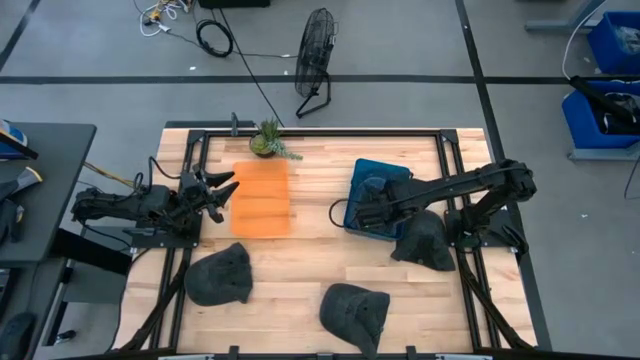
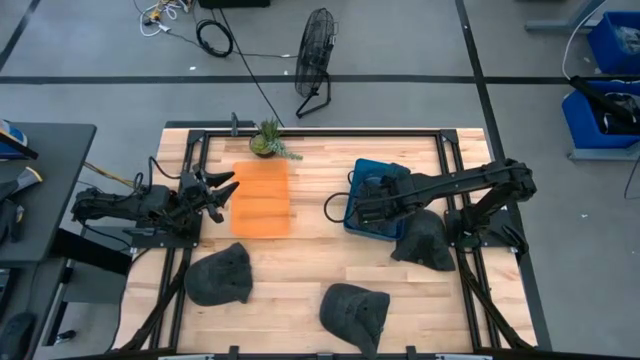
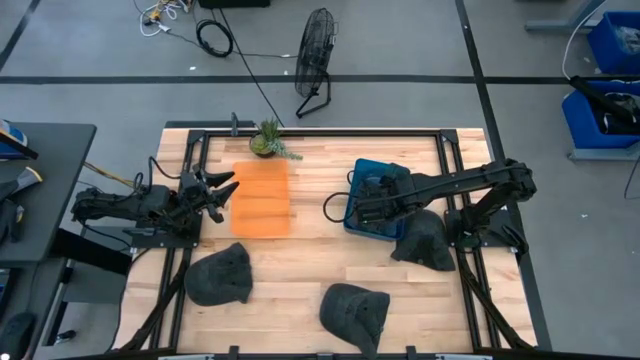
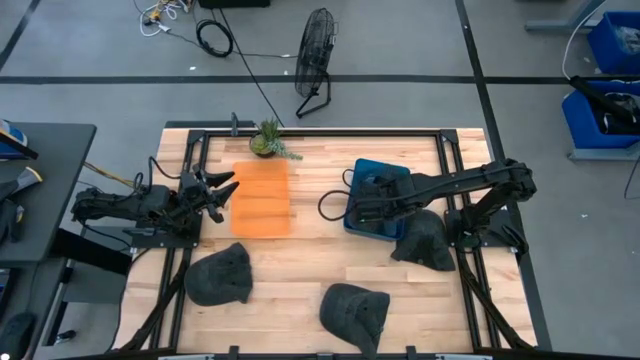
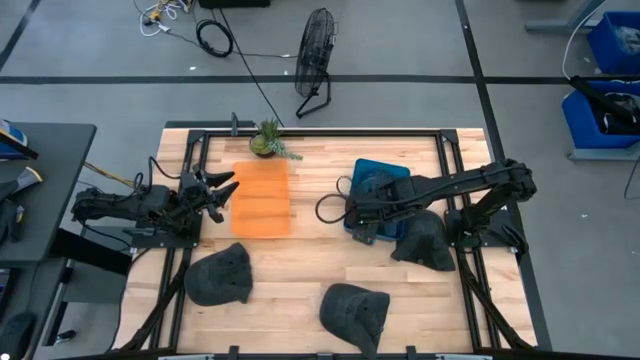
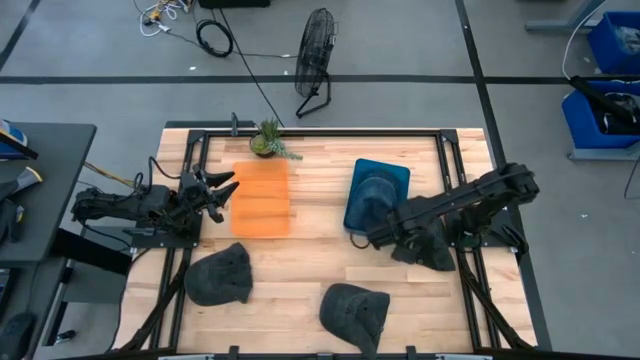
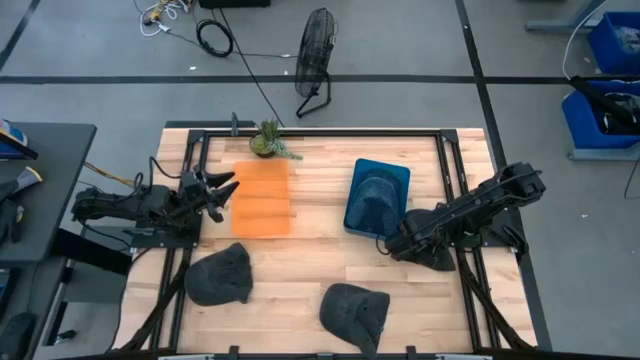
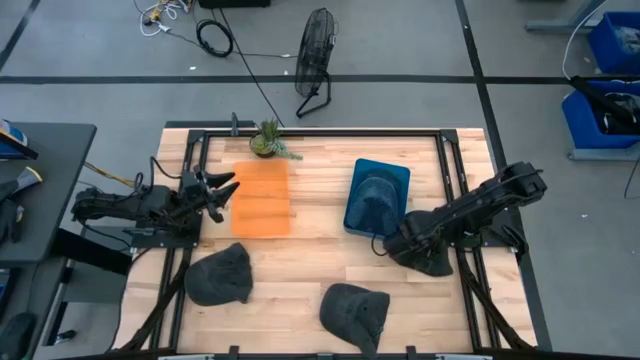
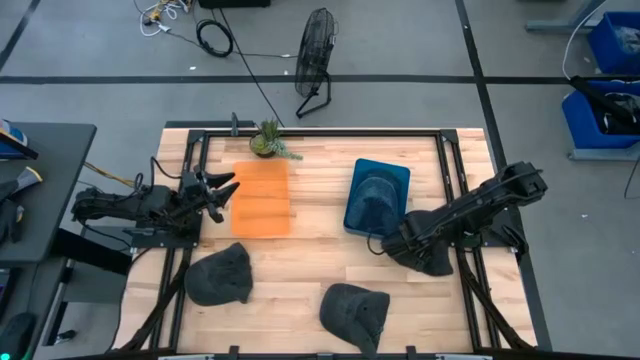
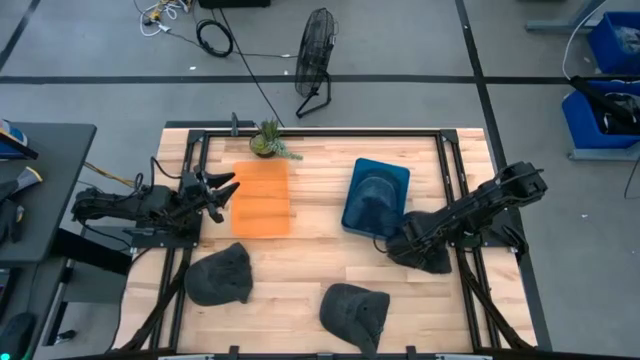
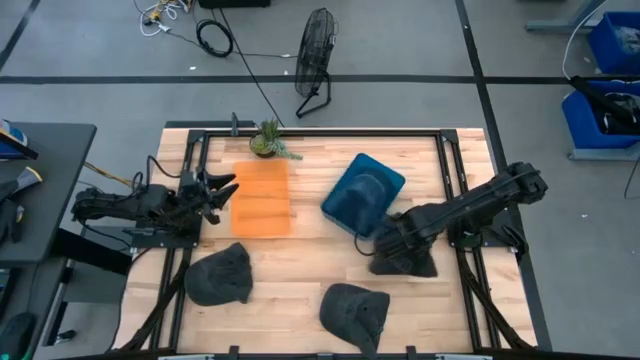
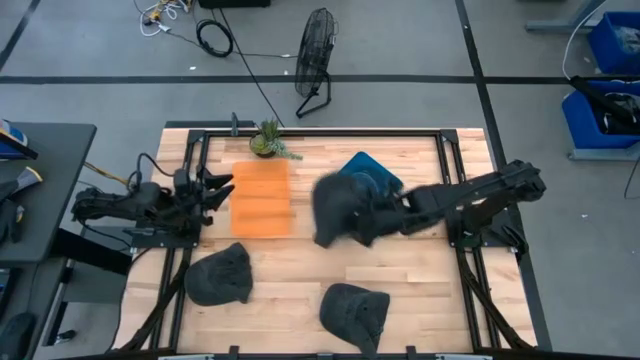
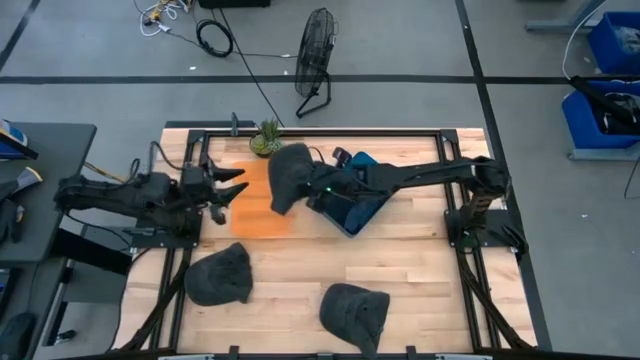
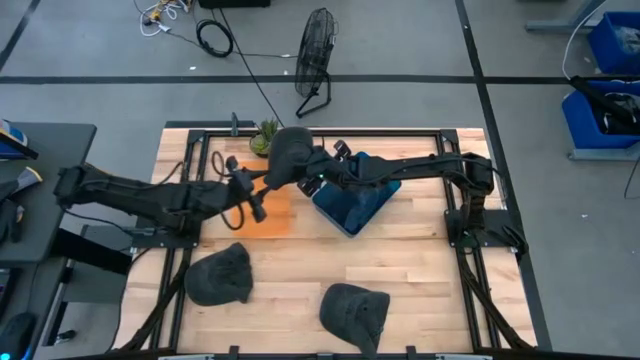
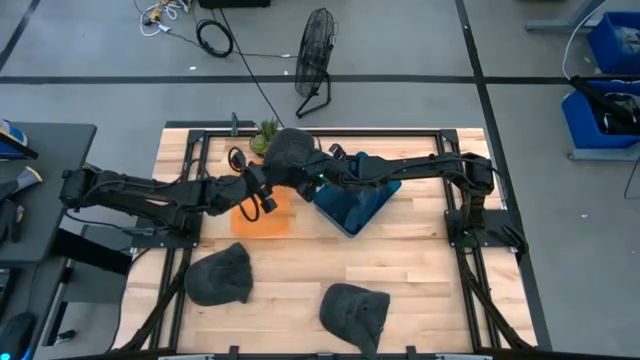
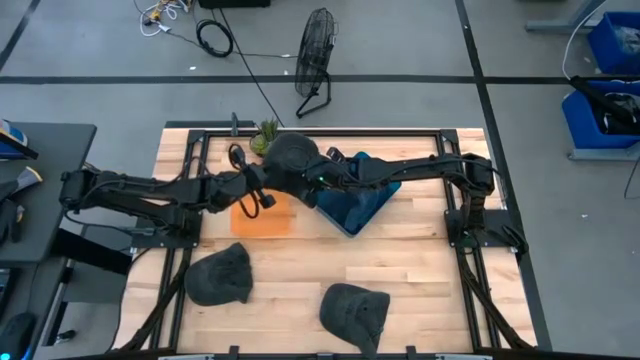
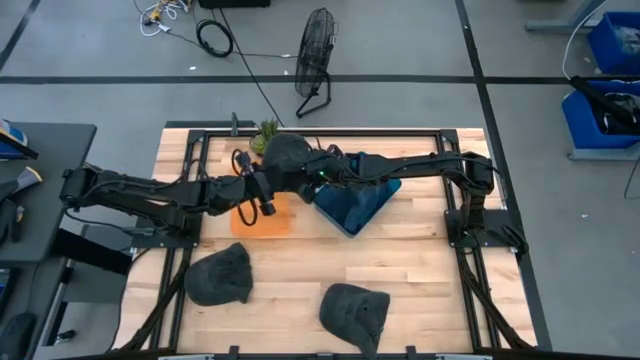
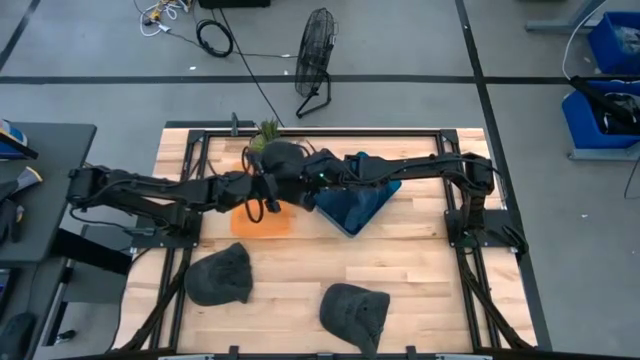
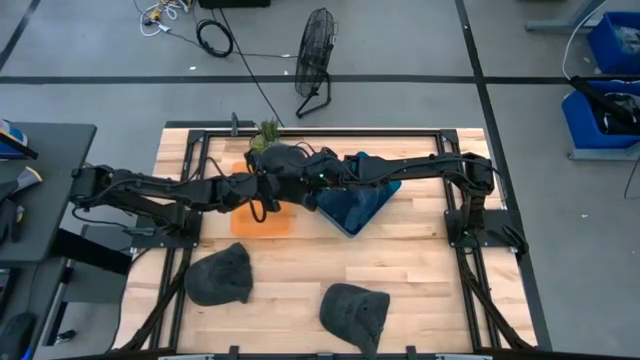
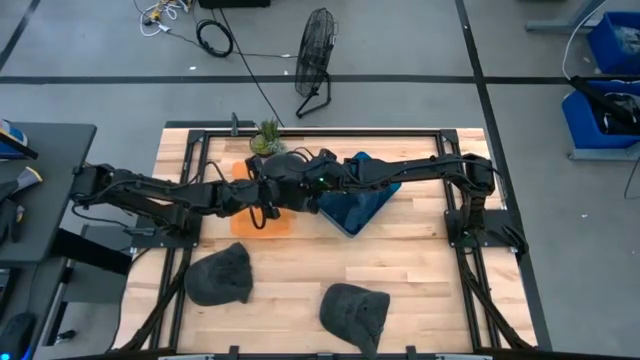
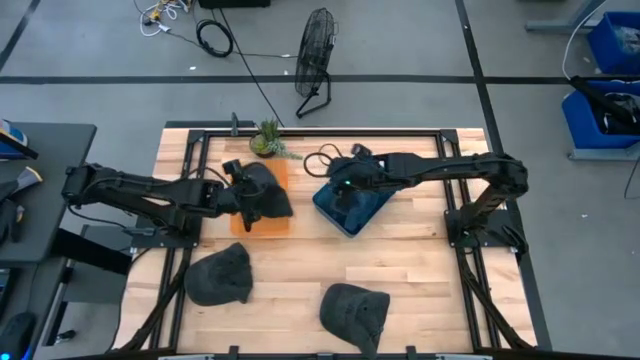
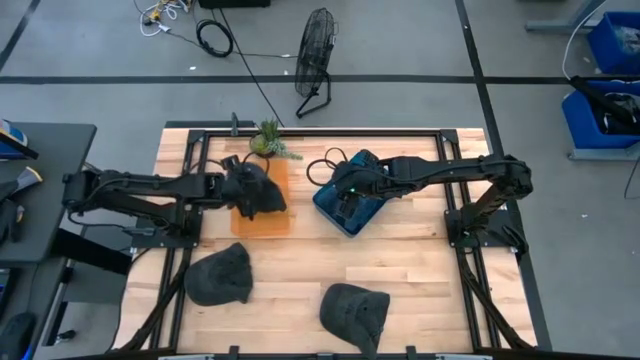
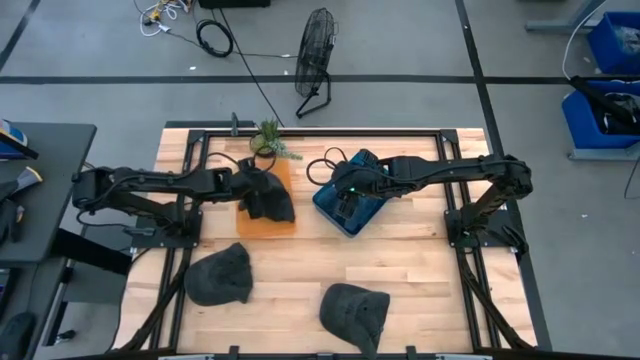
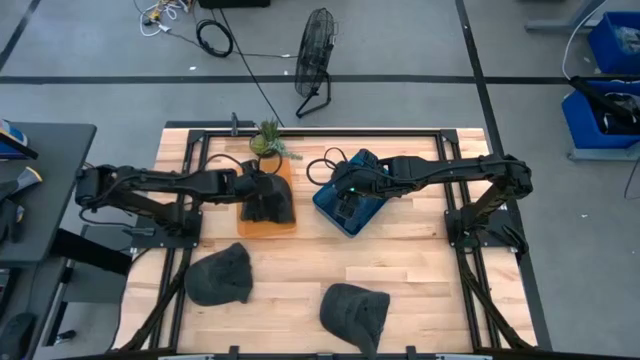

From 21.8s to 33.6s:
Task: Pick & Place hat
Put the top right black cap into the orange bin

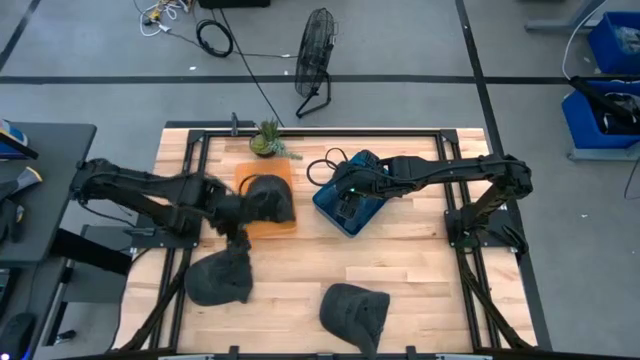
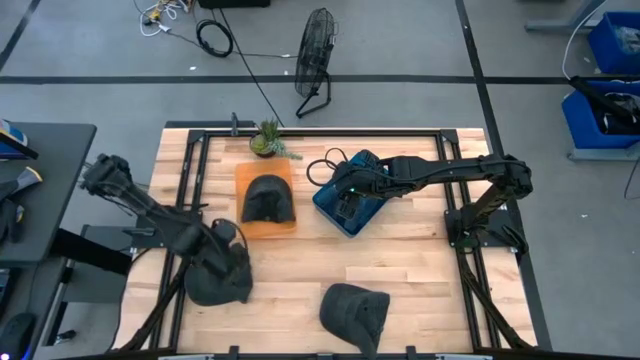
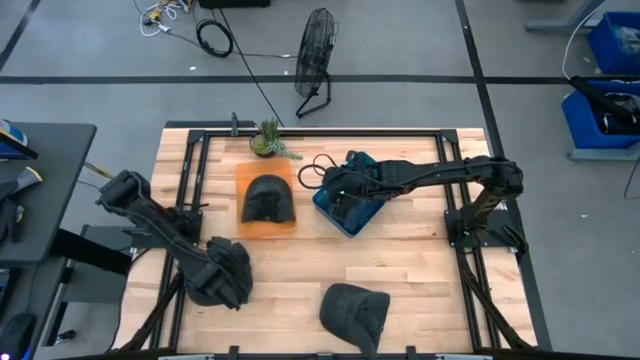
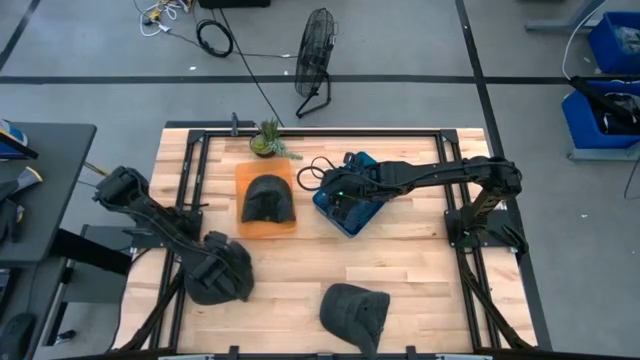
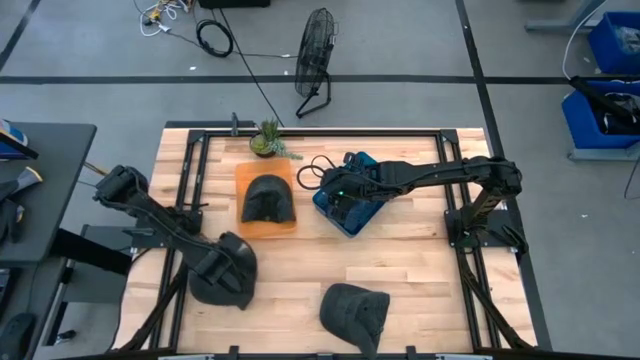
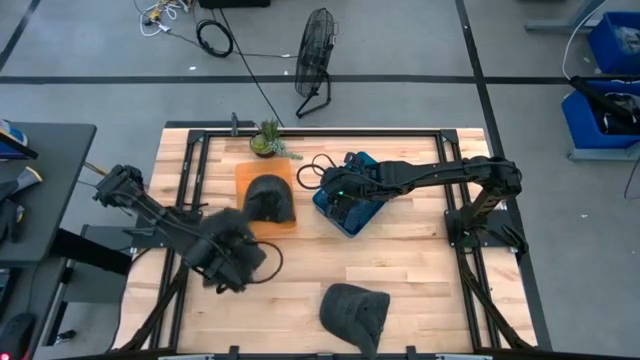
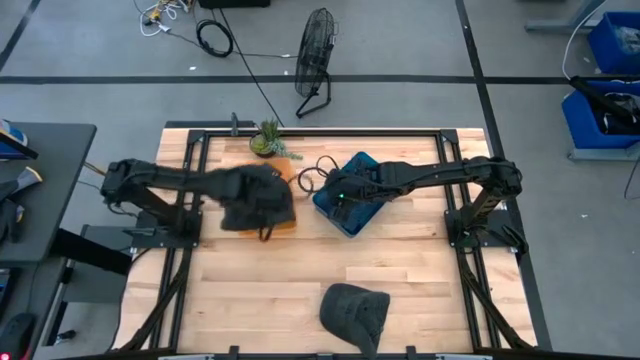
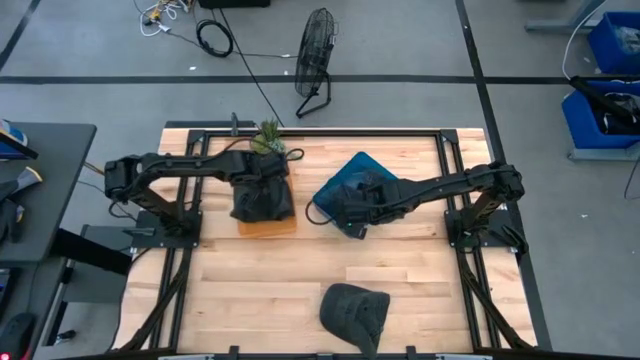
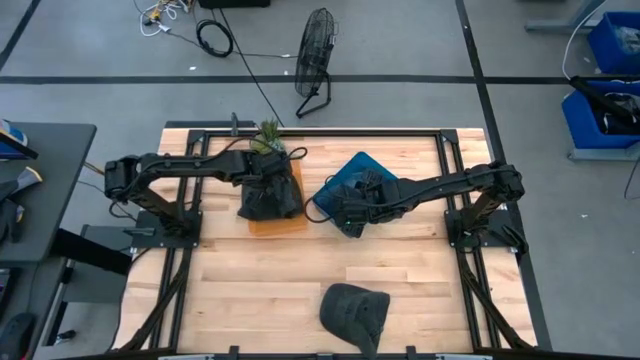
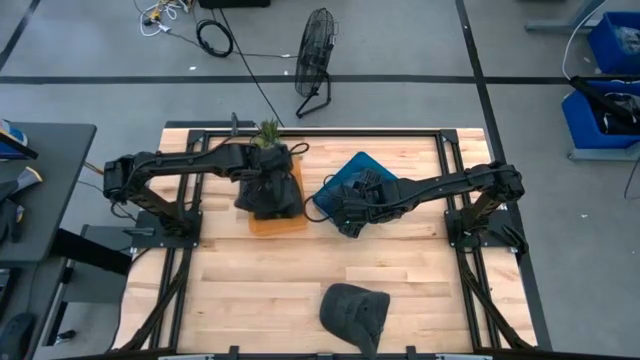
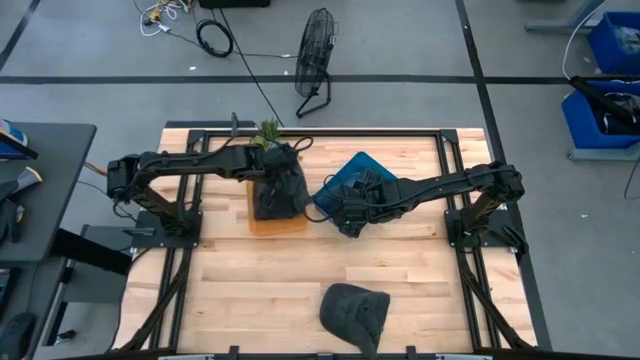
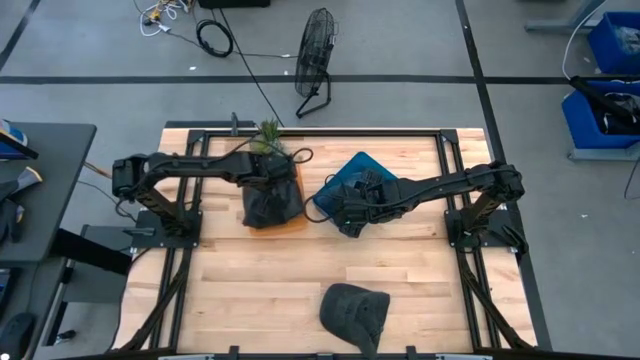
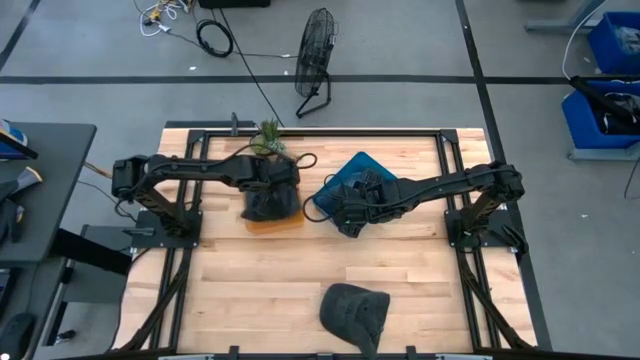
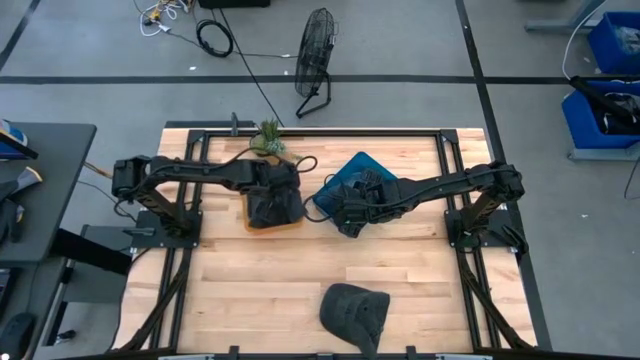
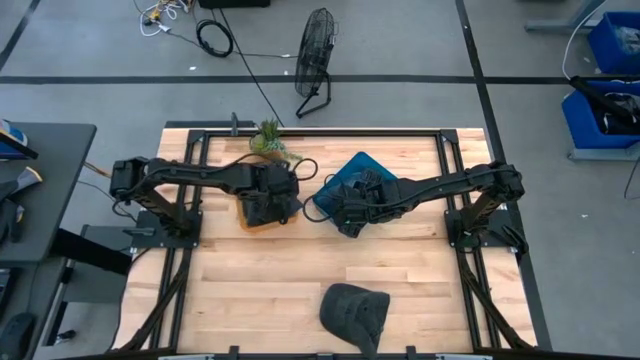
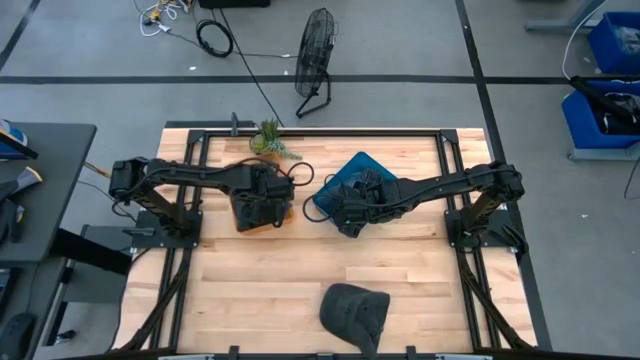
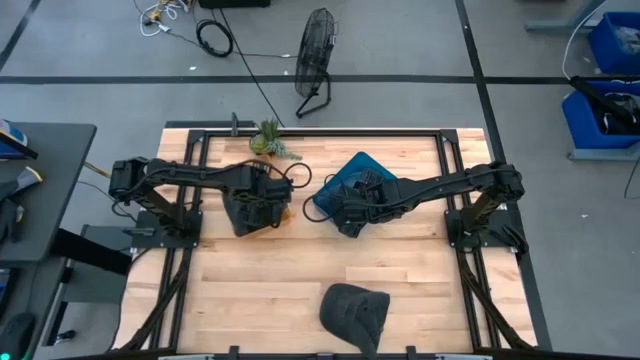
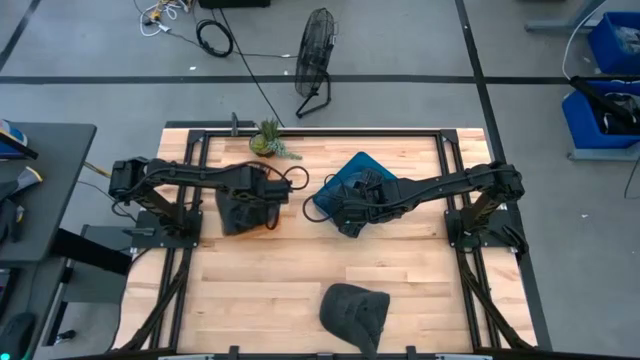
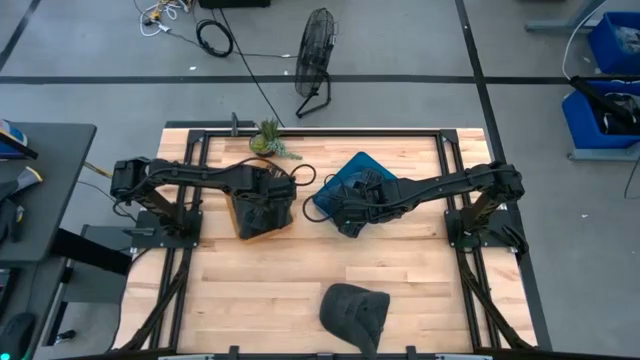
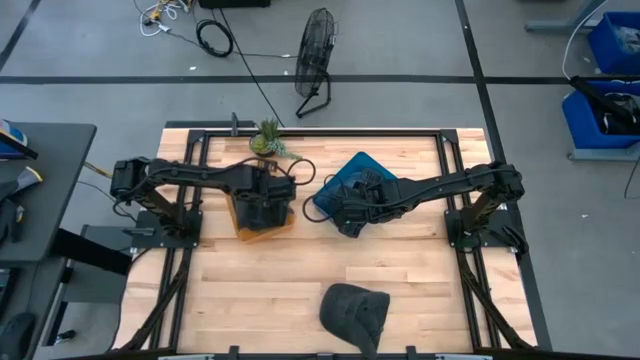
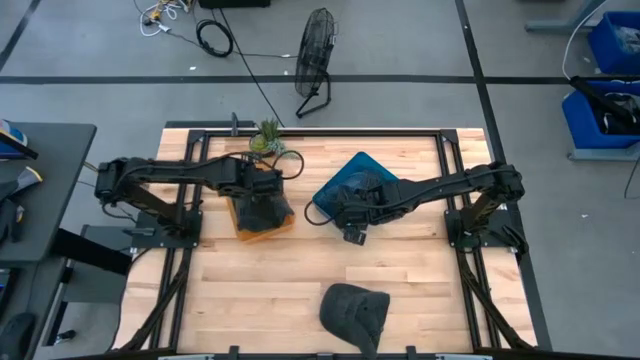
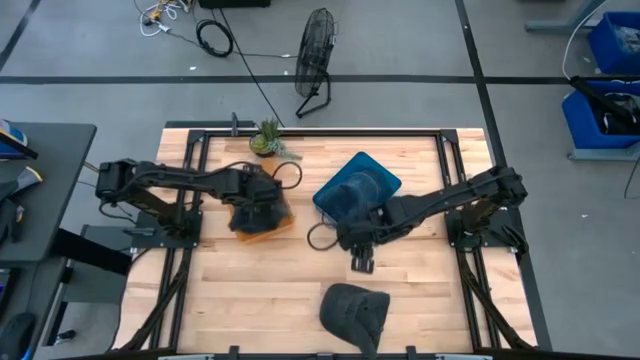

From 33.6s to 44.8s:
Put the left black cap into the orange bin
